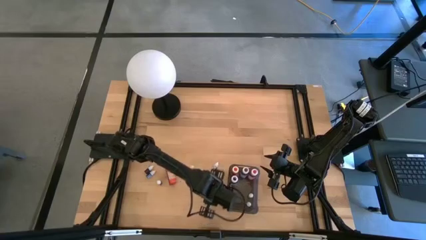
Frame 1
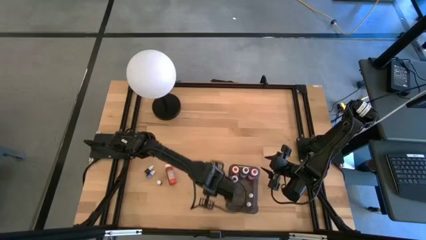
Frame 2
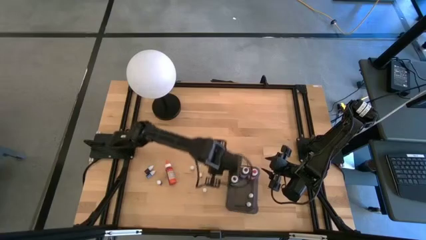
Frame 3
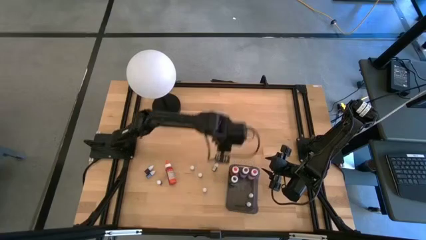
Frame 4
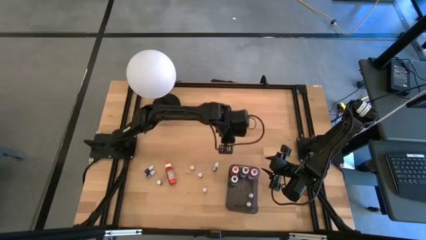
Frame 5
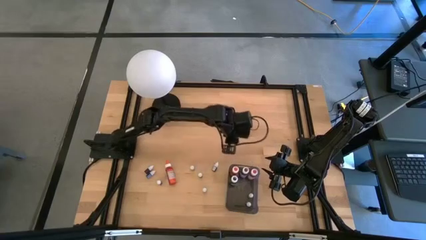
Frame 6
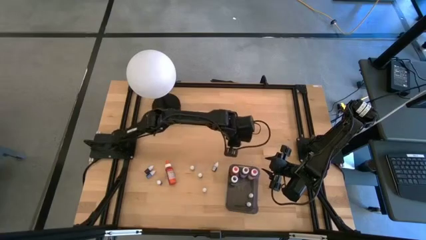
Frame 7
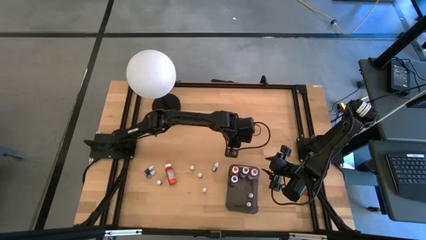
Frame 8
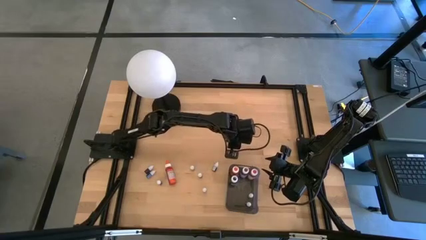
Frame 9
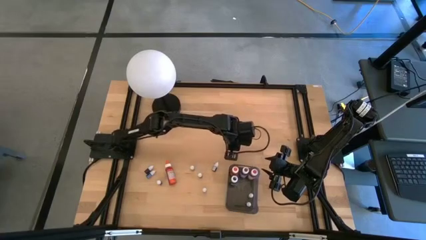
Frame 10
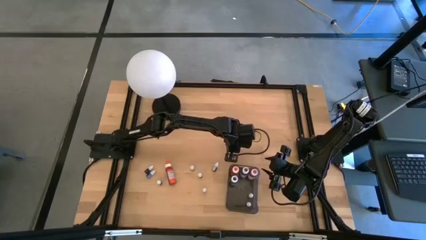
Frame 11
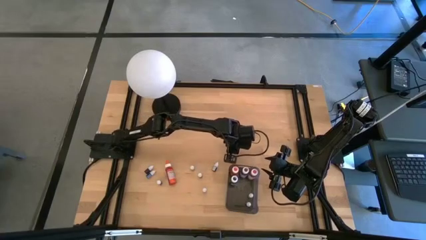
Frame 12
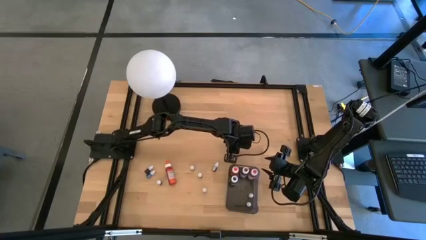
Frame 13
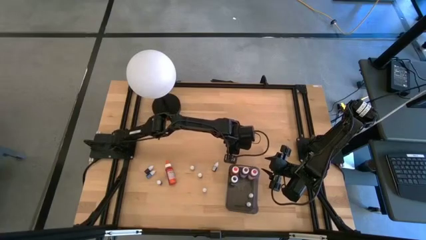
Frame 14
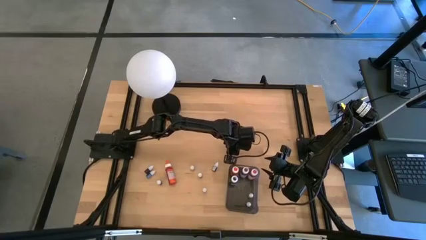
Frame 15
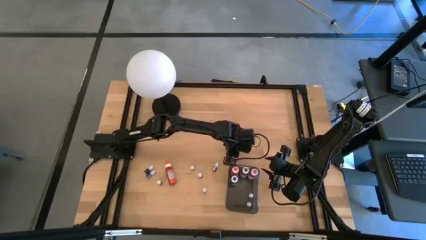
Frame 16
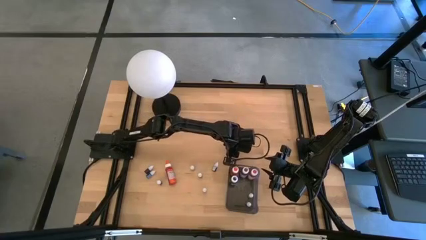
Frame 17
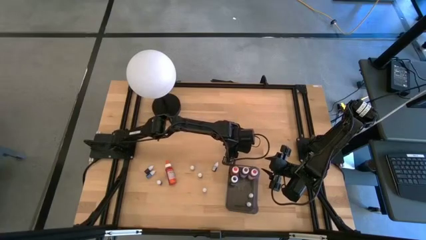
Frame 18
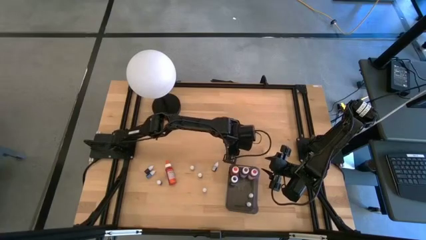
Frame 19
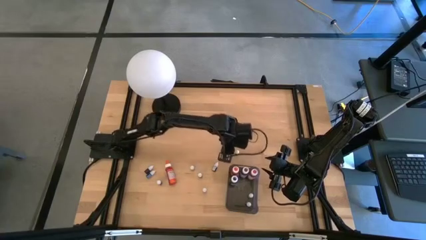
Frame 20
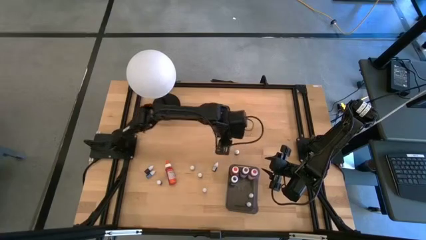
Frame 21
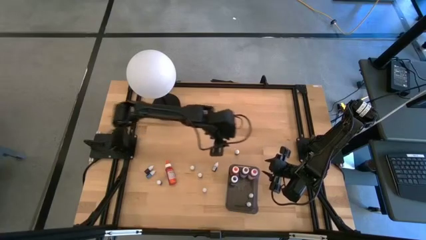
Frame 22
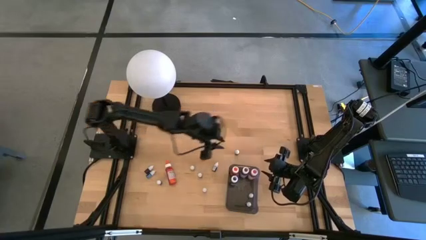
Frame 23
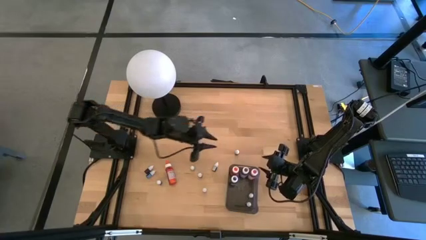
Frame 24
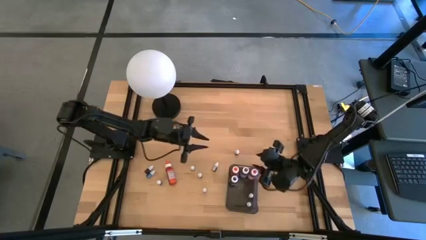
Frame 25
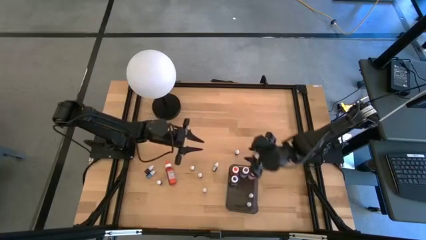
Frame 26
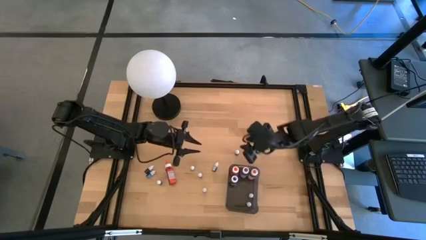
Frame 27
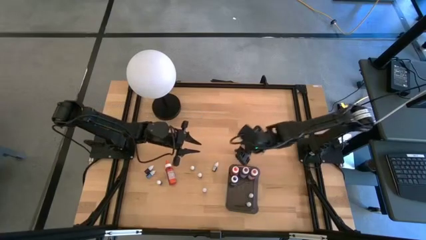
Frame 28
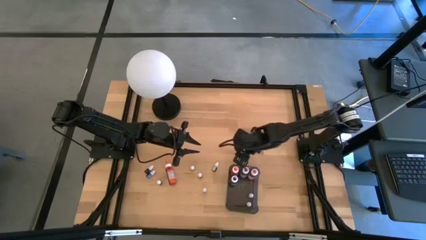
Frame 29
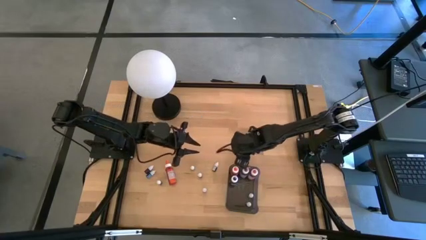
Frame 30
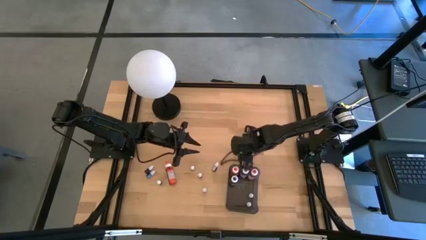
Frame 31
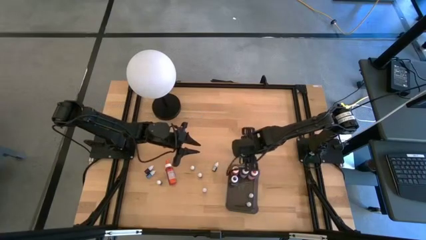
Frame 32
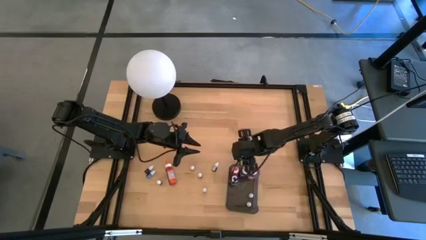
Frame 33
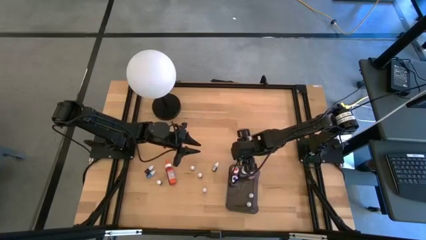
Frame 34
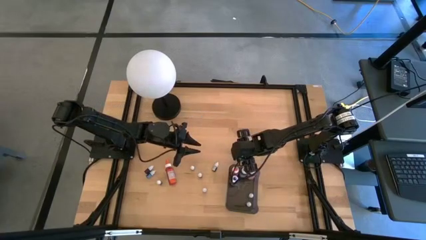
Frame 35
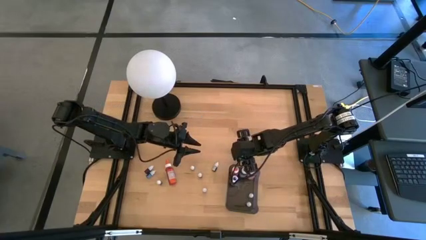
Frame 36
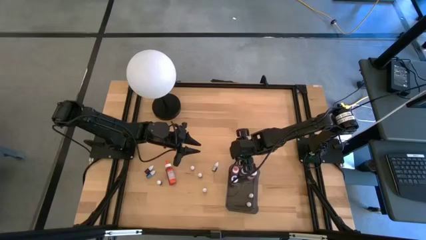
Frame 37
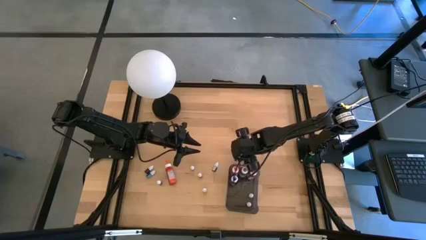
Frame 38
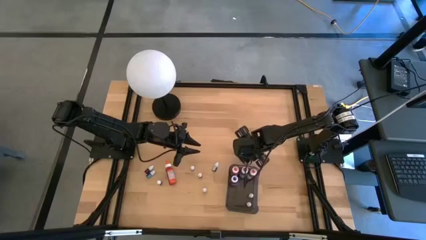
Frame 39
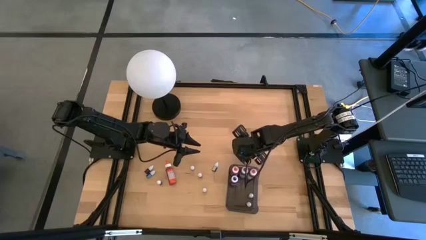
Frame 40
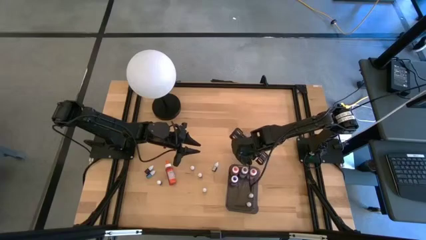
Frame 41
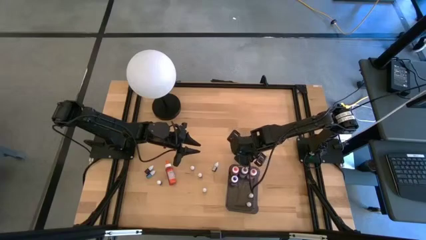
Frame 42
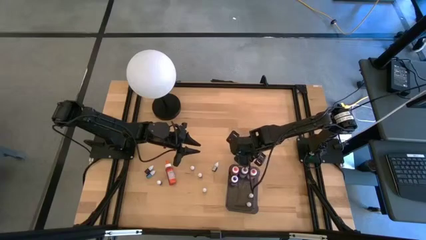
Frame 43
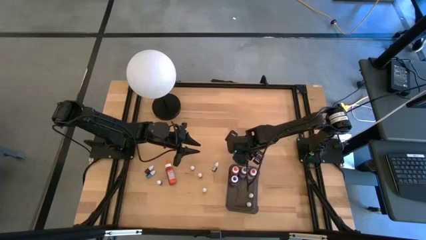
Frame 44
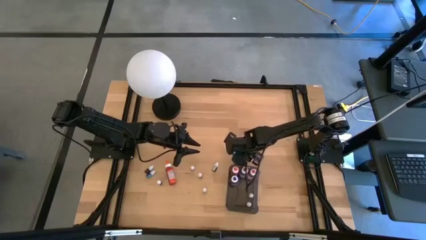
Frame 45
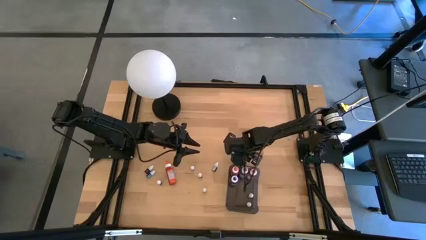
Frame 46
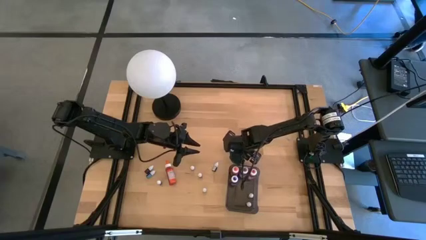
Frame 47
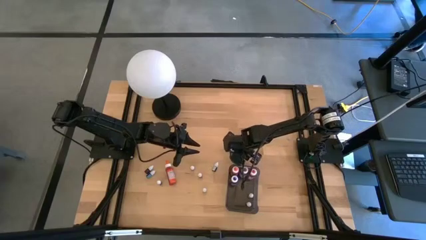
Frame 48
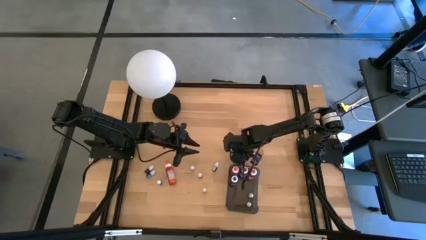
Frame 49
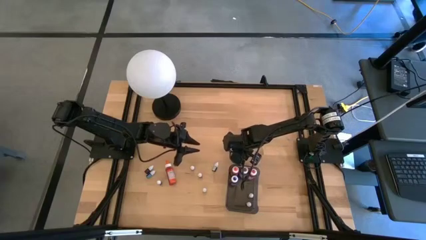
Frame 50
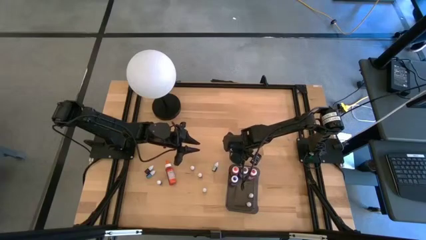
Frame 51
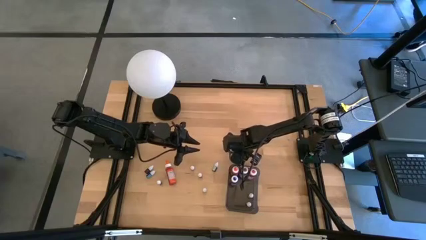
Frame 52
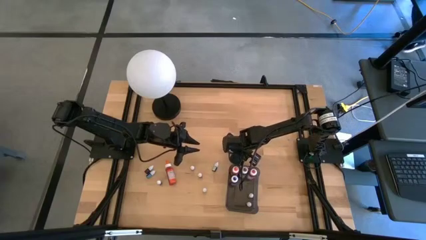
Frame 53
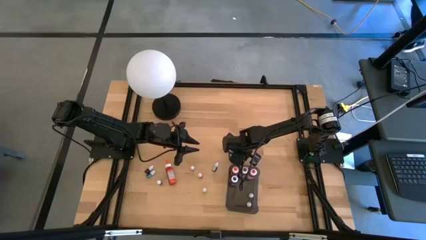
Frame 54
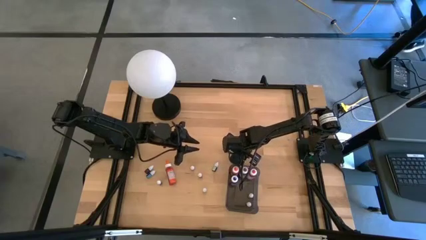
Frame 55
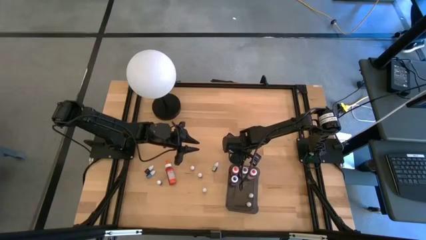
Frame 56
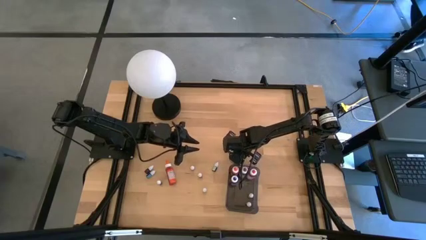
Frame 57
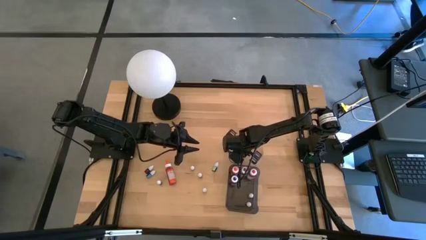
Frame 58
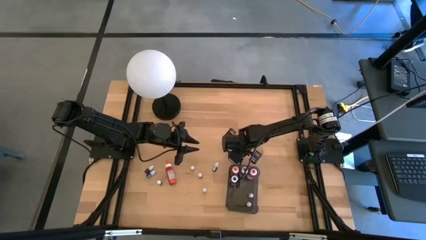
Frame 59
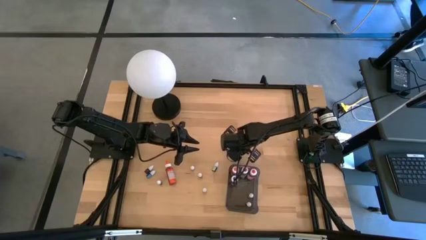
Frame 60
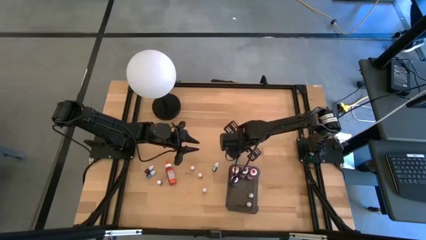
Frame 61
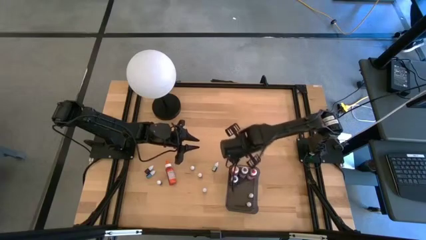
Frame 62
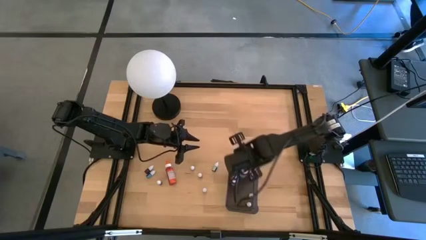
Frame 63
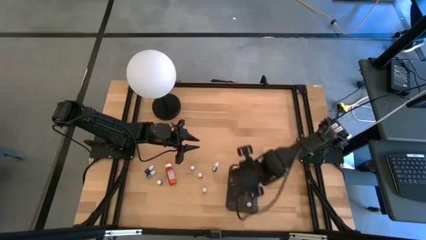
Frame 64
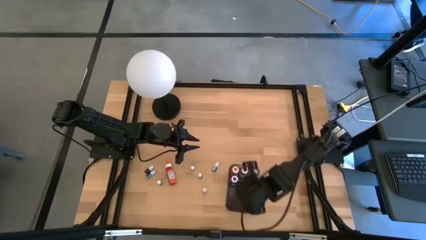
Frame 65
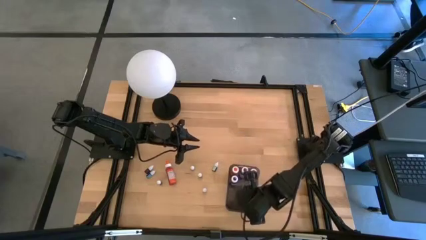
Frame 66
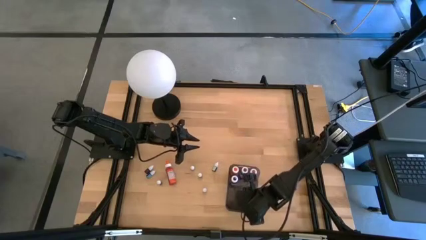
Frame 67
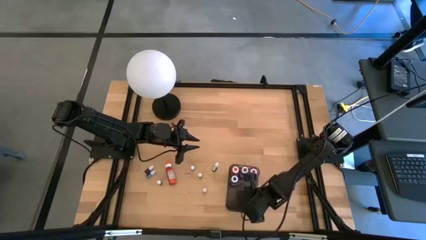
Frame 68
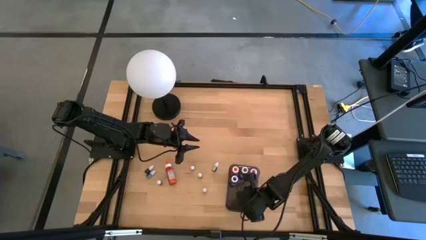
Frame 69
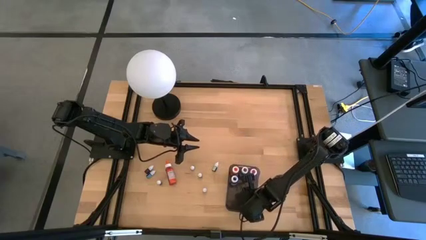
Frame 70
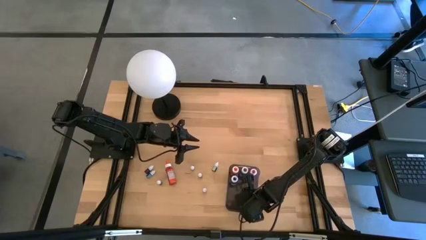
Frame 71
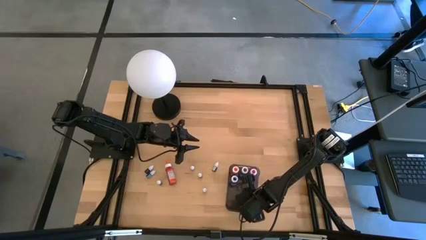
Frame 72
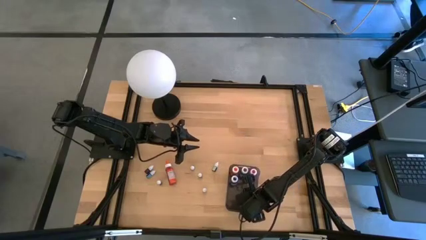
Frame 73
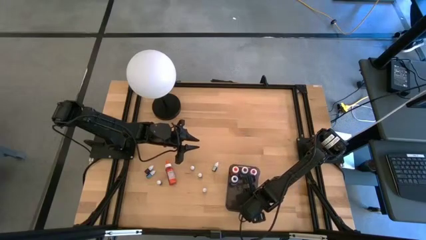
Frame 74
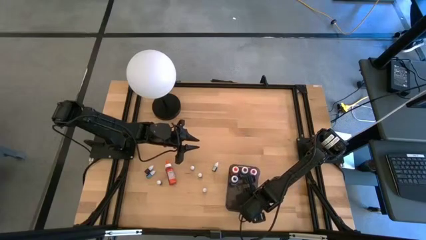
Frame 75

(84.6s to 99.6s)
Task: Pick & Place food coloring
Put the small food coloring bottle into the black bin

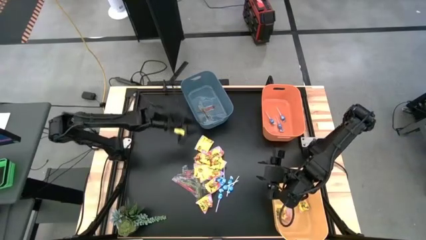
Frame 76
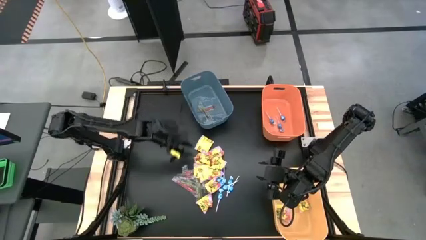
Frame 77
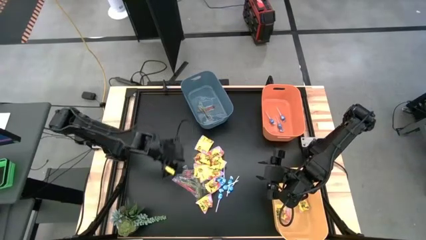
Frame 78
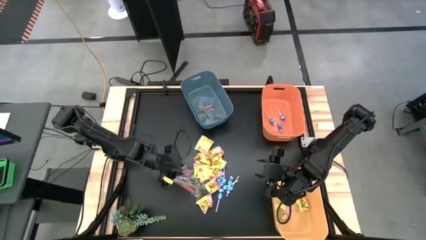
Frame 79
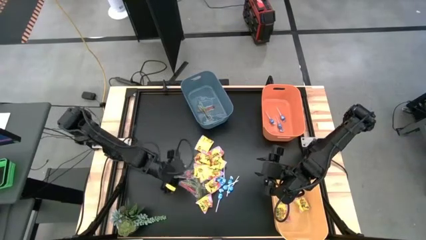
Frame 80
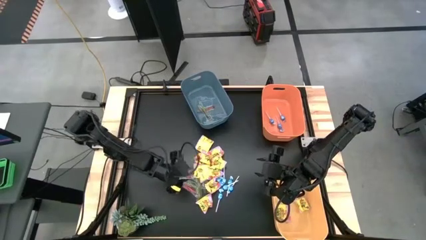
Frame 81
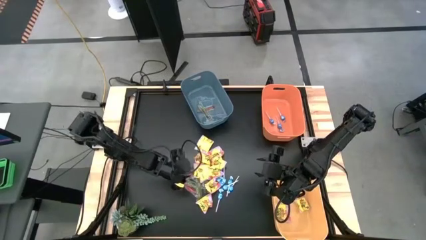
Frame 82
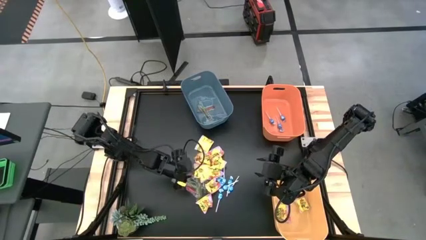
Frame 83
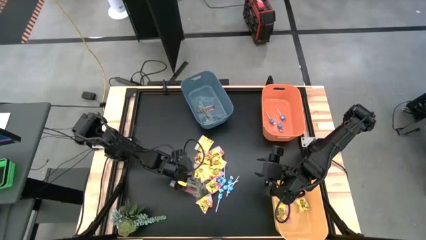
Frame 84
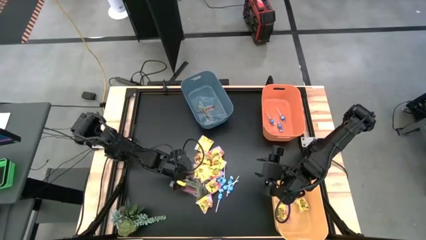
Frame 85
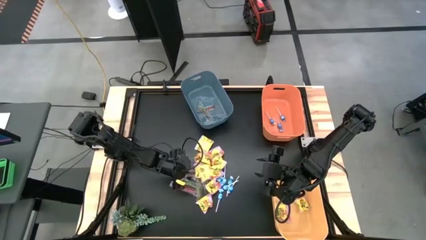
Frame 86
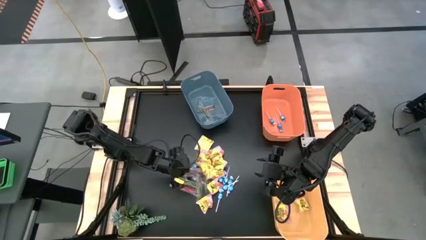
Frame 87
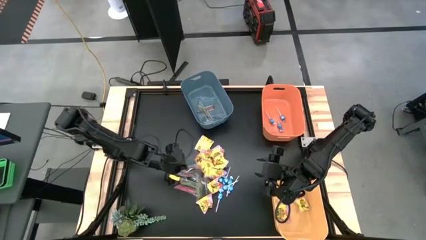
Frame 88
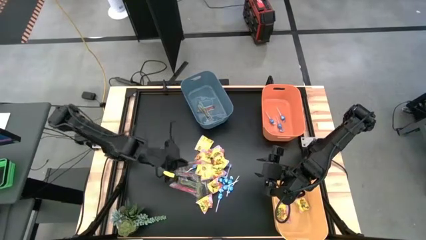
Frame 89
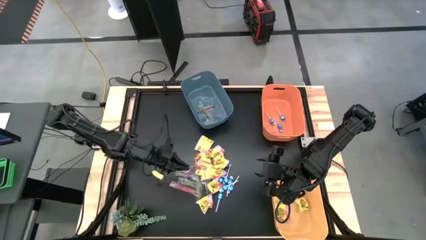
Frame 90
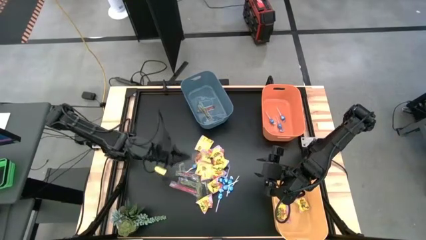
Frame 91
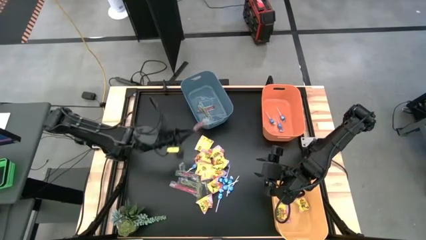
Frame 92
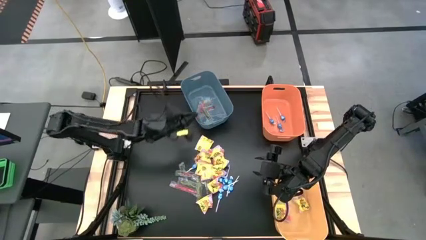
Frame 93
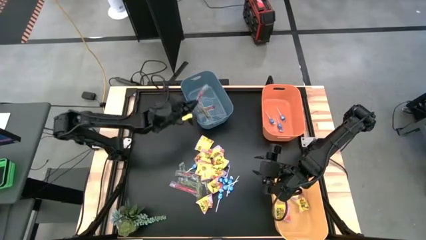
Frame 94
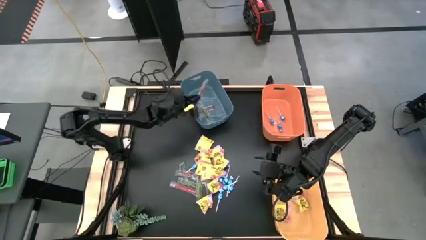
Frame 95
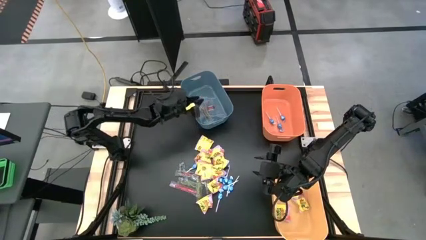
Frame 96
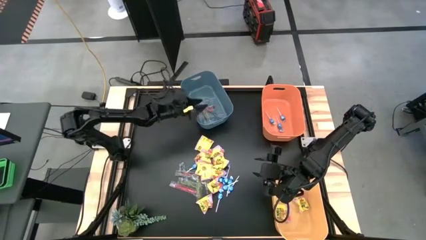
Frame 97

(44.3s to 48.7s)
Task: Sort candy
Put the transparent candy into the blue bin
